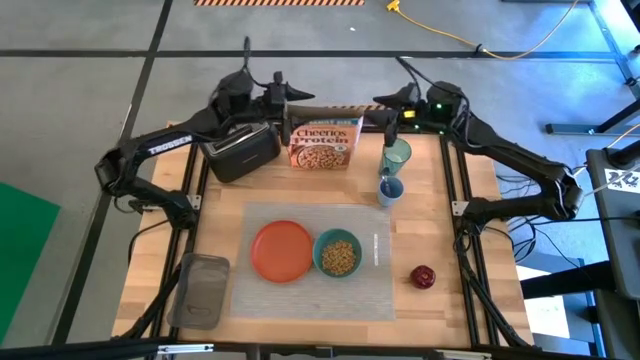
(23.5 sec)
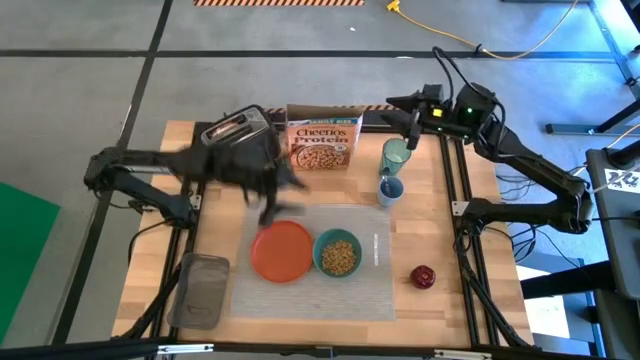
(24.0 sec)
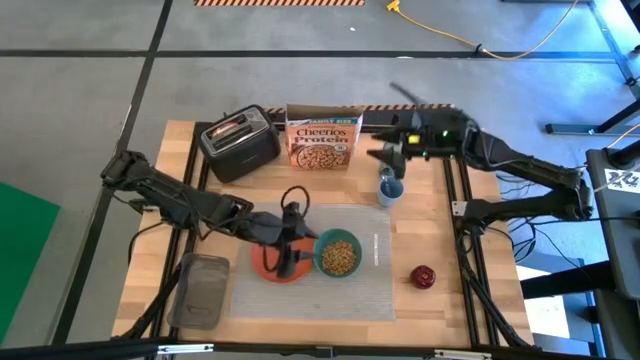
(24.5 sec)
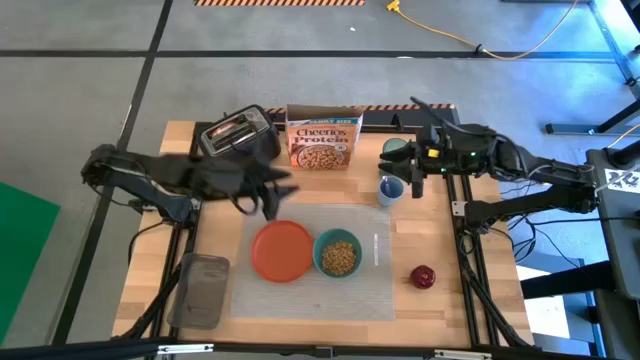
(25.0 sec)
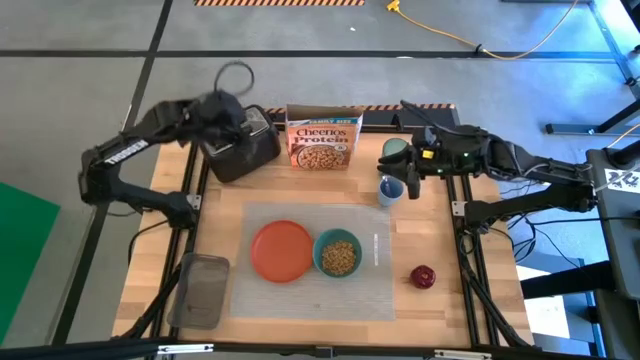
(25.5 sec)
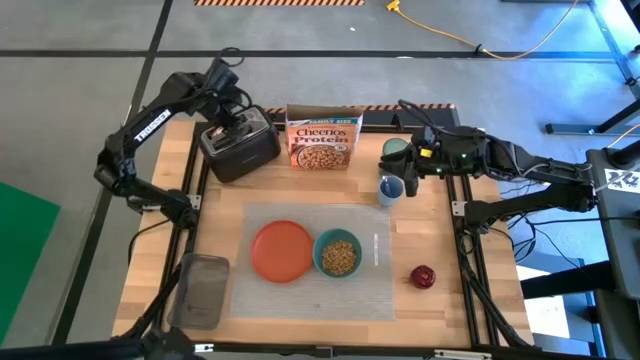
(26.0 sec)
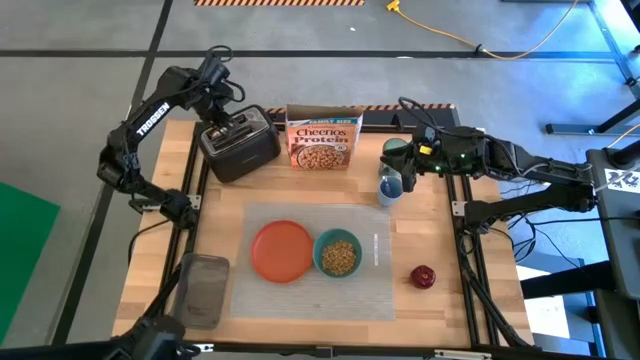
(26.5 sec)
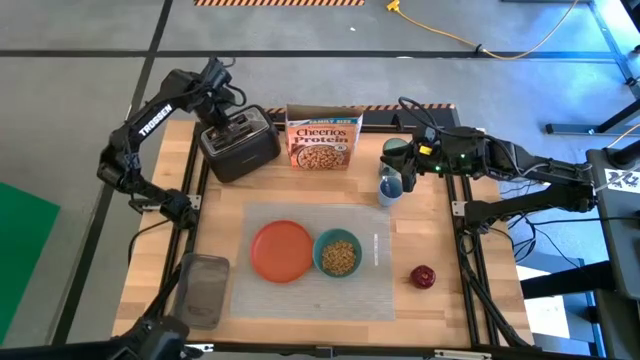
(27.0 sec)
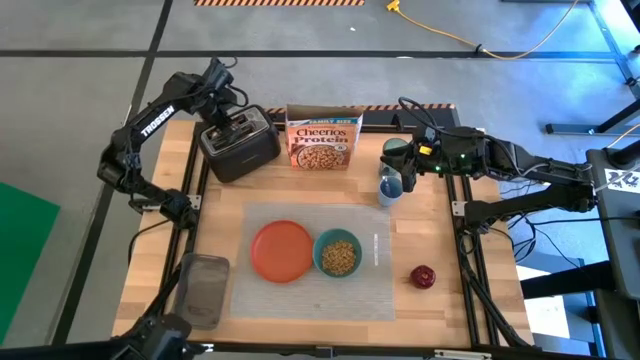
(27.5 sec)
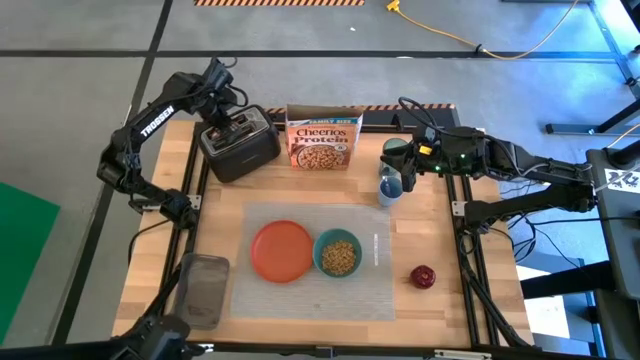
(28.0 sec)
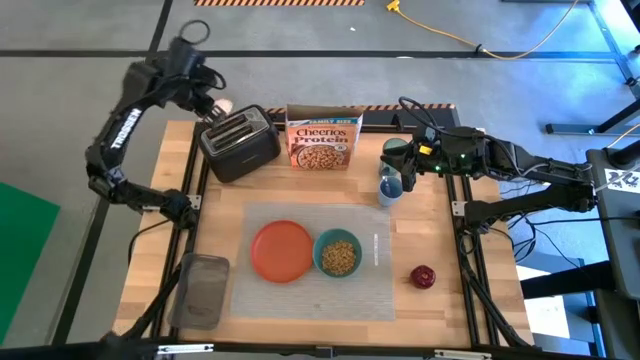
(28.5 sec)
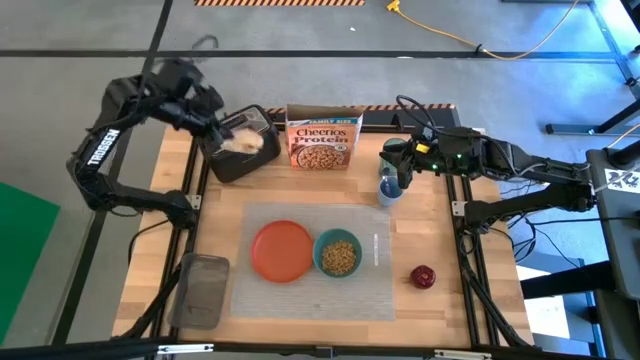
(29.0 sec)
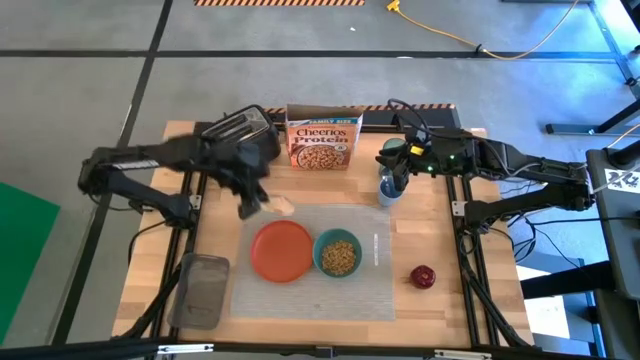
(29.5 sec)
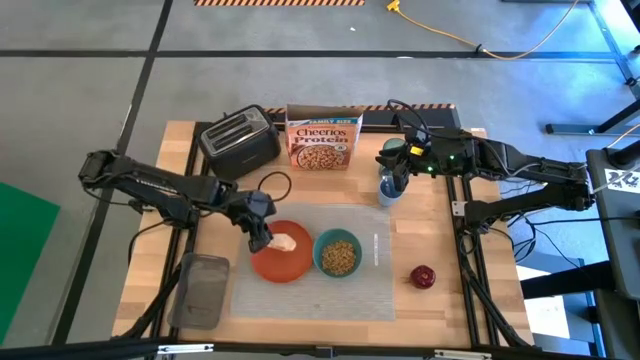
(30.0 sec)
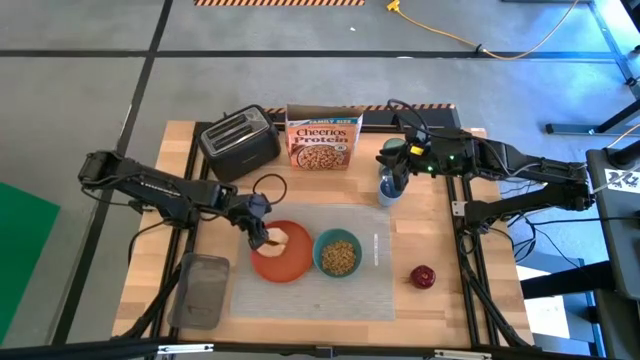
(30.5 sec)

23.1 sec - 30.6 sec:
Task: Arrange a breakfast setting
Put the toasted bread on the orange plate

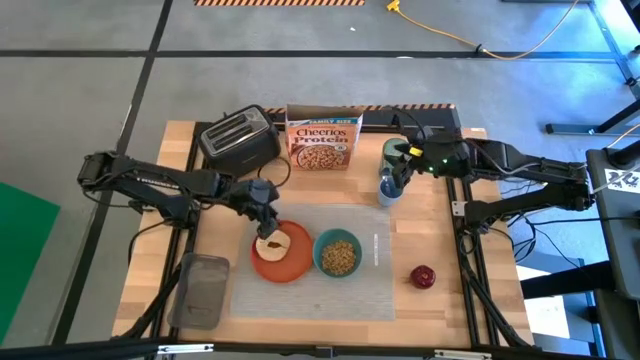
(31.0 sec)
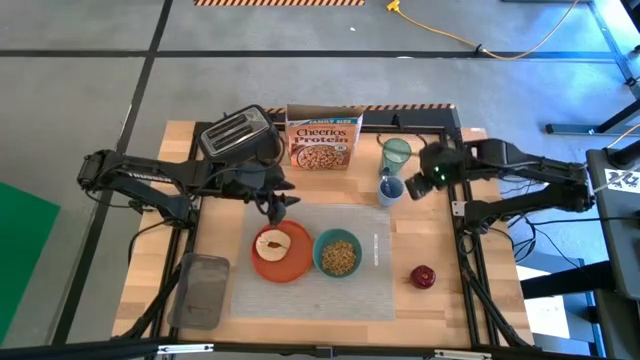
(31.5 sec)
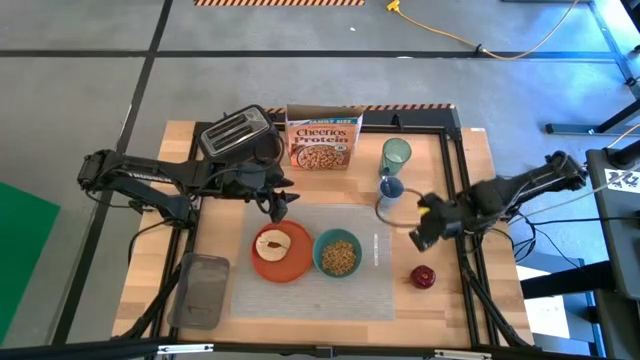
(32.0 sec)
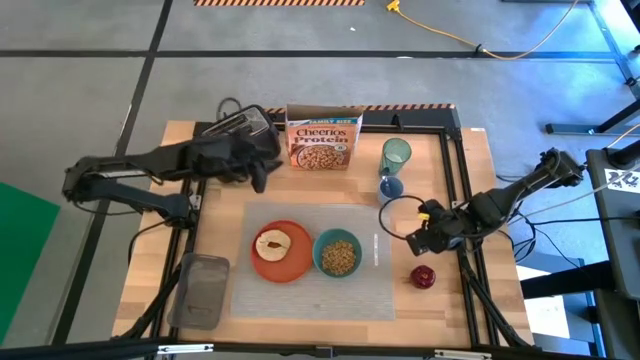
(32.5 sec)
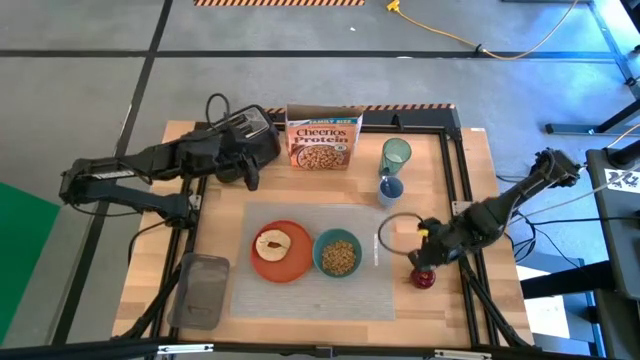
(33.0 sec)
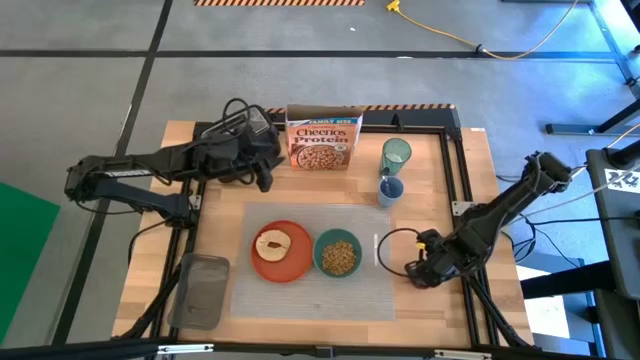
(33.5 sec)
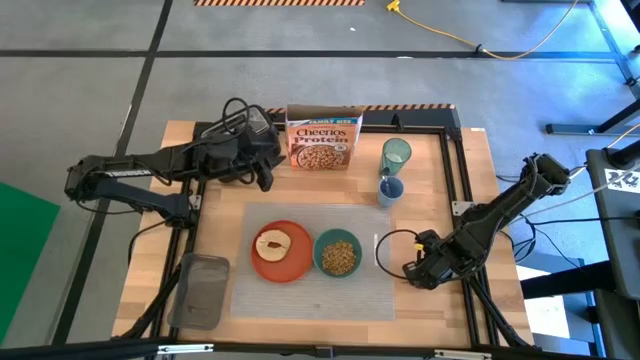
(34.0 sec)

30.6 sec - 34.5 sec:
Put the red apple on the orange plate

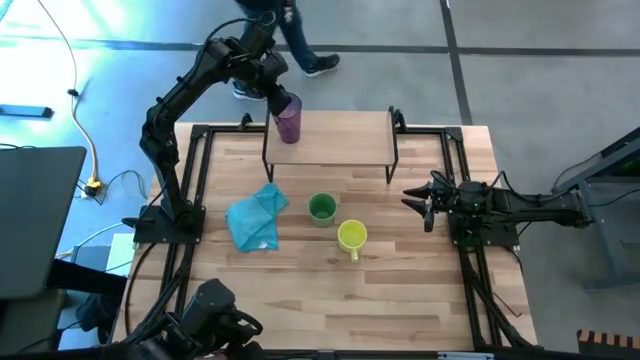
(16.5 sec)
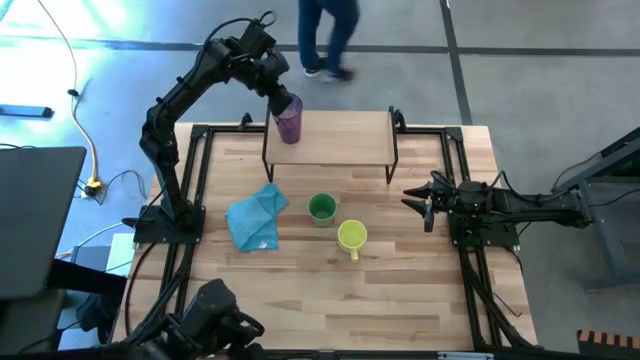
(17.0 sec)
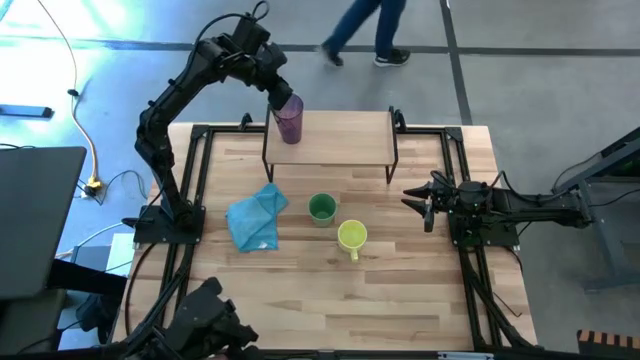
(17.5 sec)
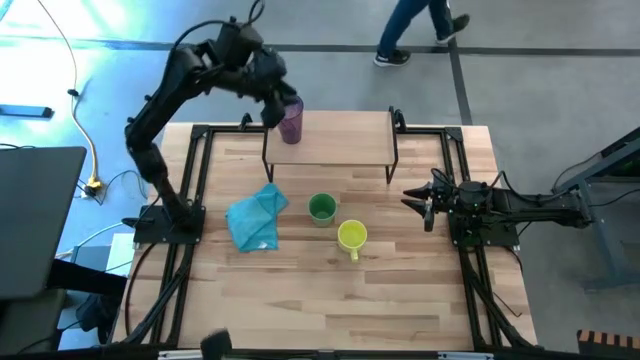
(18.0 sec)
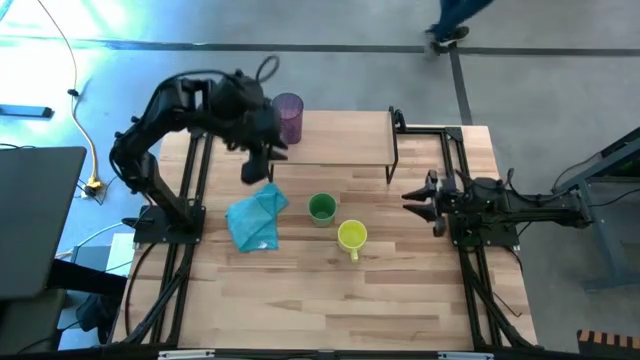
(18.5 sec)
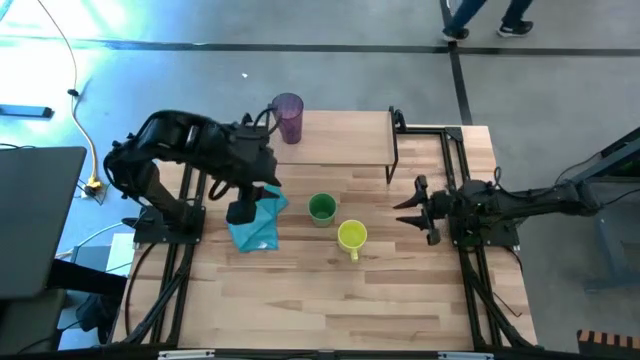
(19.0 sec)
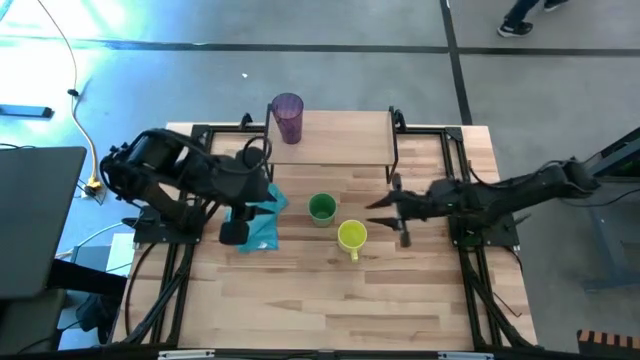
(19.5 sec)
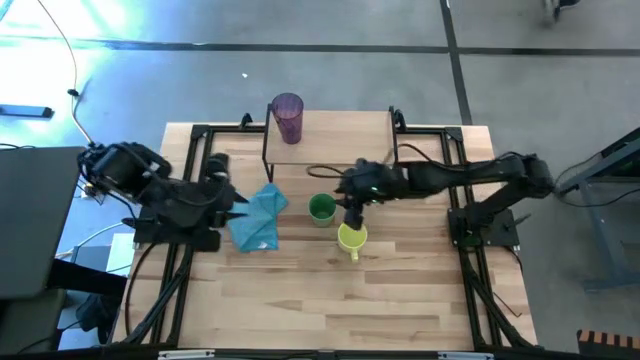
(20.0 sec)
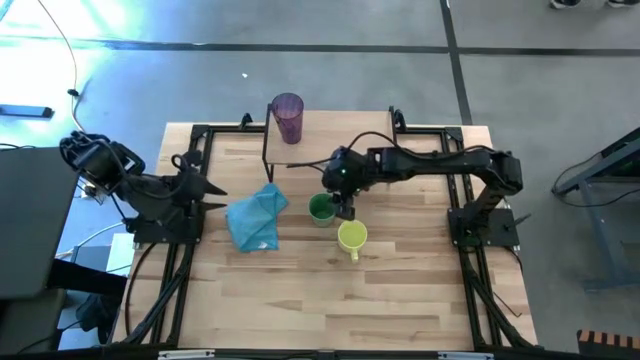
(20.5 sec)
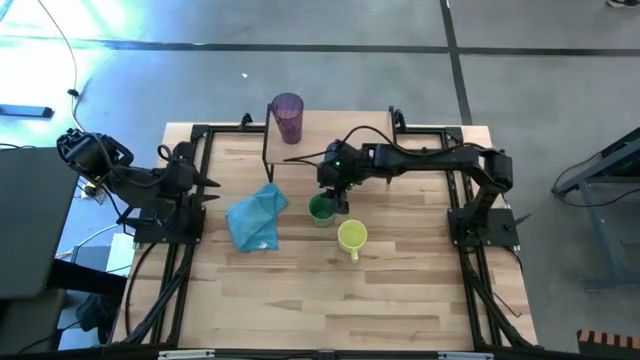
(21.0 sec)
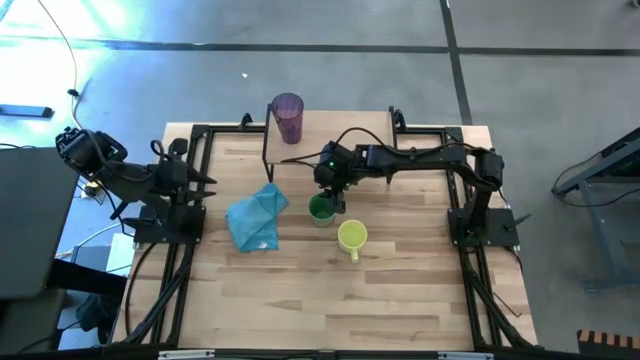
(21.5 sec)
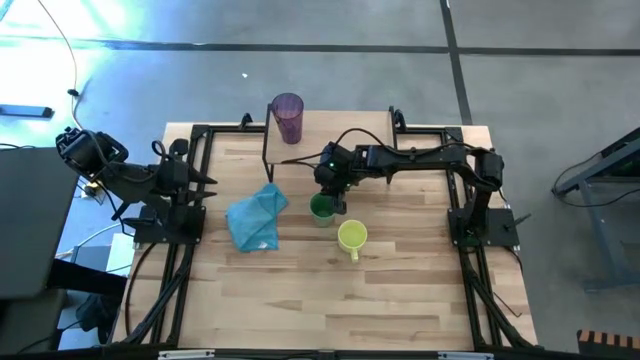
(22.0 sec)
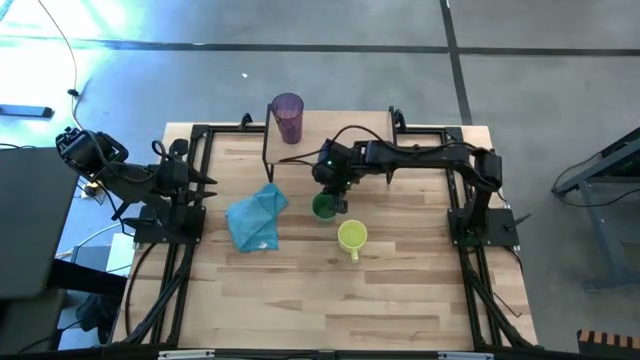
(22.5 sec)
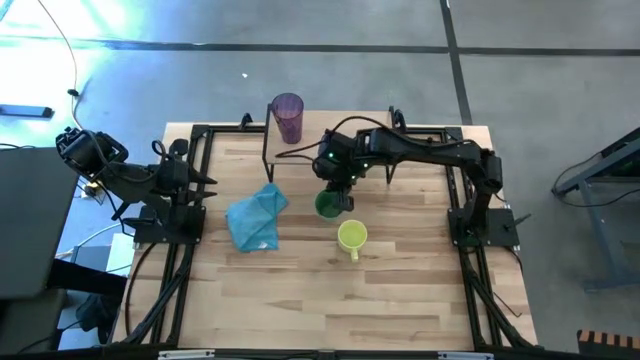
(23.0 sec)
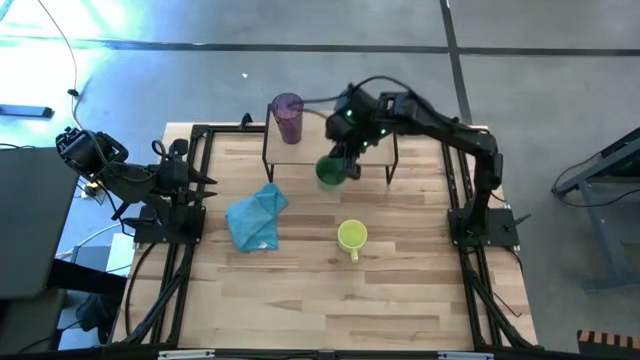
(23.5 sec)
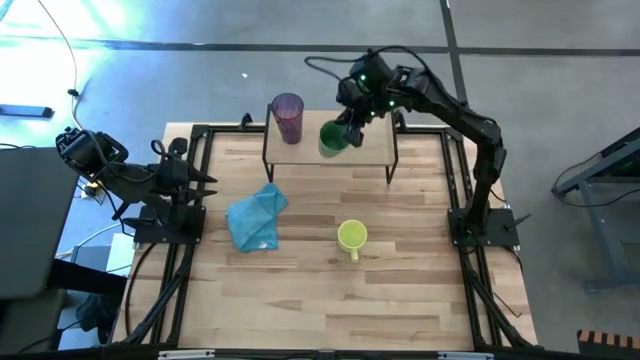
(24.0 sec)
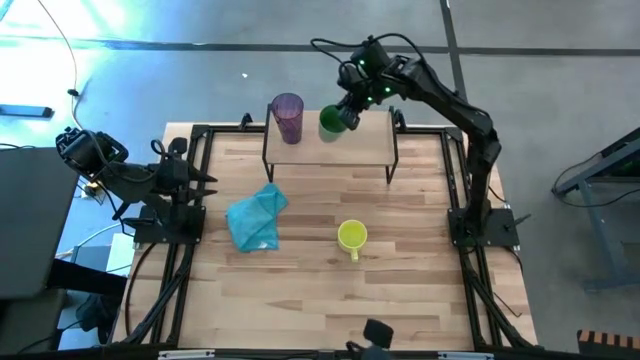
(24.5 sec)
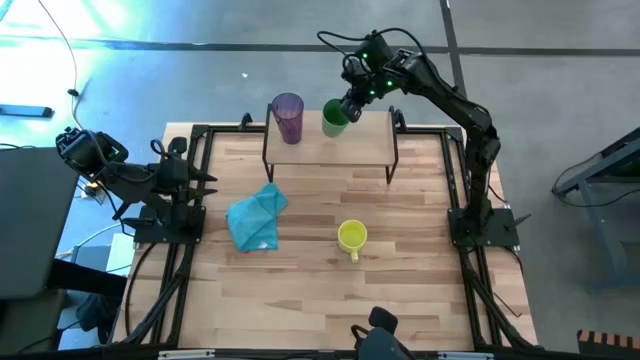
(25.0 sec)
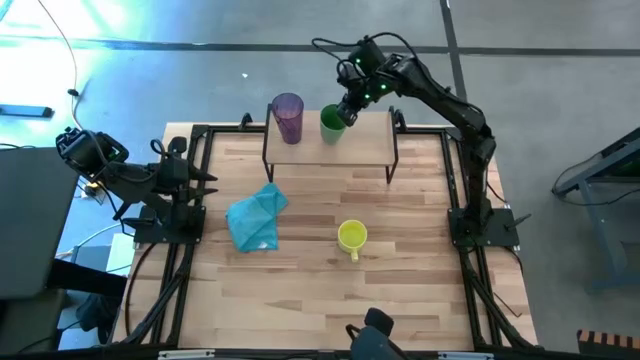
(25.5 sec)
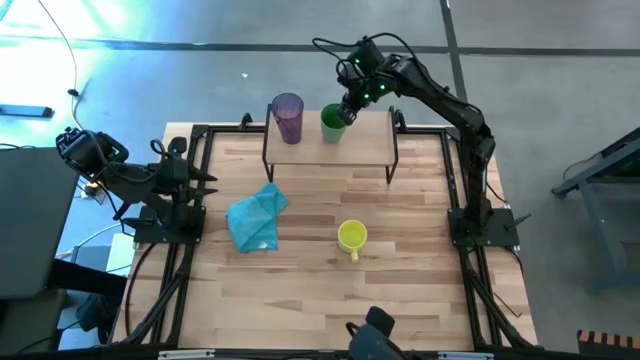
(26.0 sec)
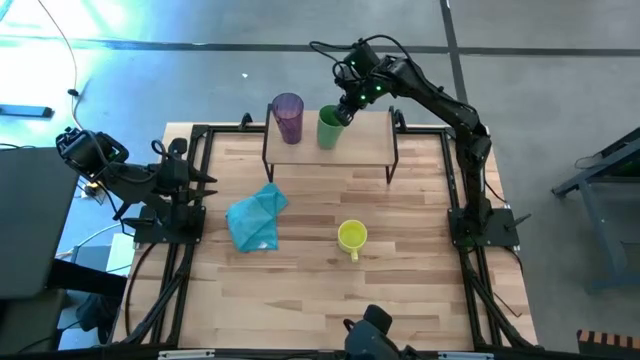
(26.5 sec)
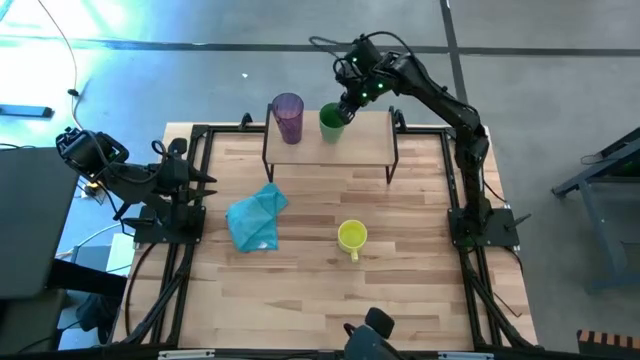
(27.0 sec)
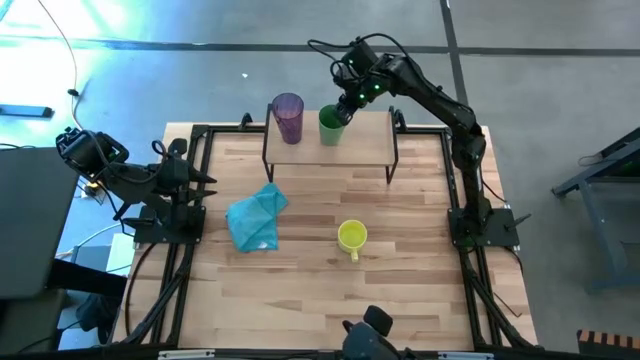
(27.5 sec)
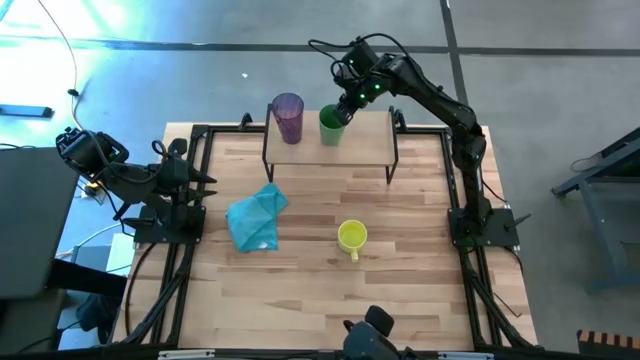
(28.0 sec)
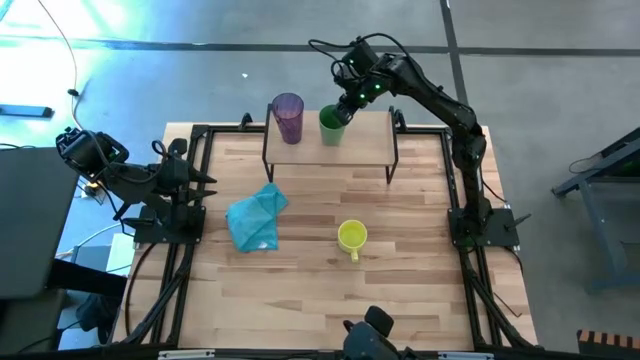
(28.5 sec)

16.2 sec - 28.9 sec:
Task: Stack small to large cups/mugs on shelf
Put the green cup on the shelf
